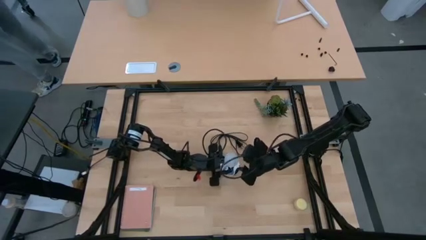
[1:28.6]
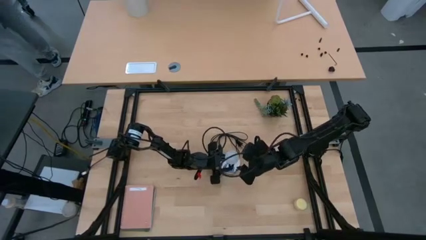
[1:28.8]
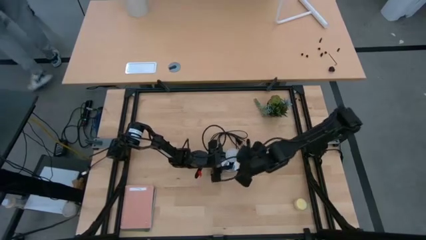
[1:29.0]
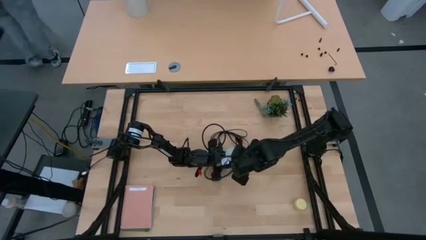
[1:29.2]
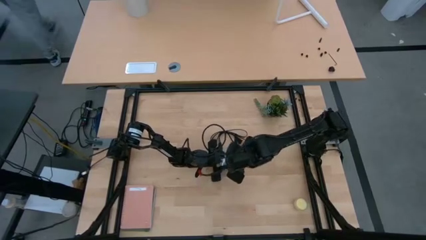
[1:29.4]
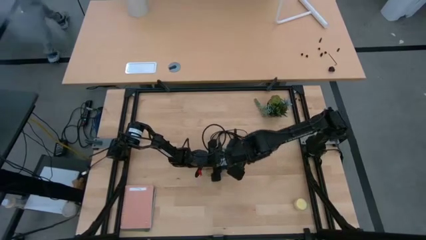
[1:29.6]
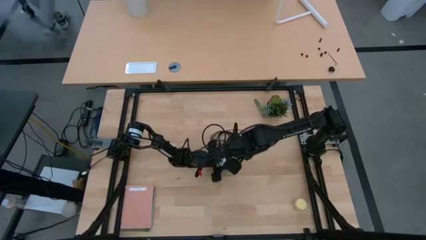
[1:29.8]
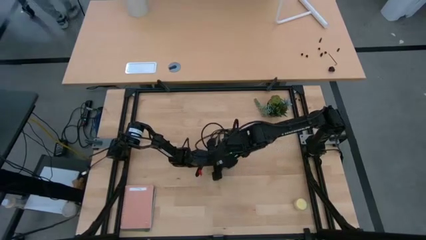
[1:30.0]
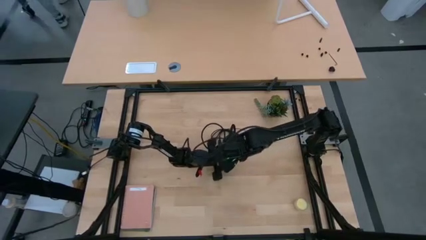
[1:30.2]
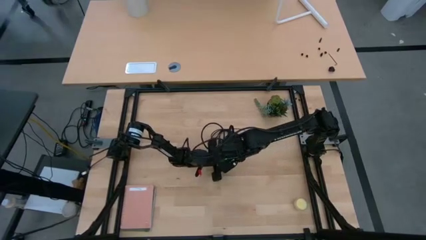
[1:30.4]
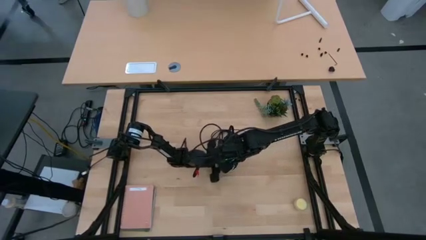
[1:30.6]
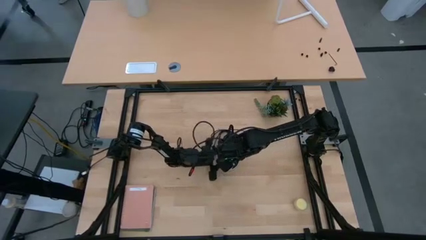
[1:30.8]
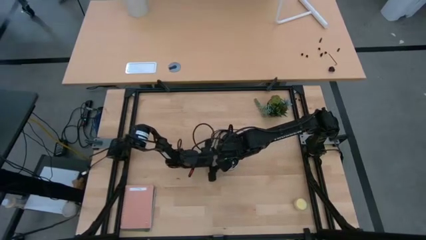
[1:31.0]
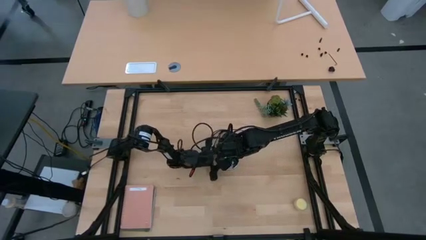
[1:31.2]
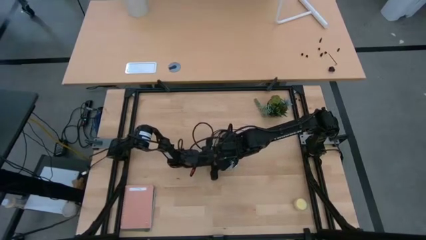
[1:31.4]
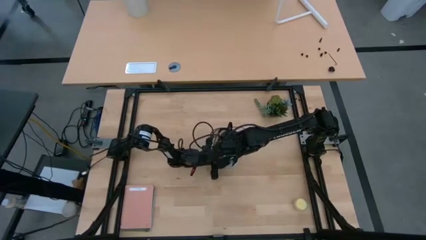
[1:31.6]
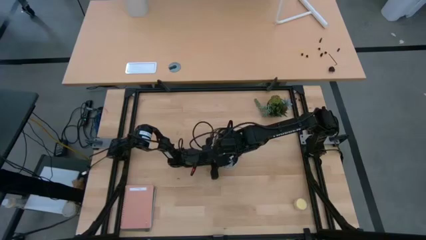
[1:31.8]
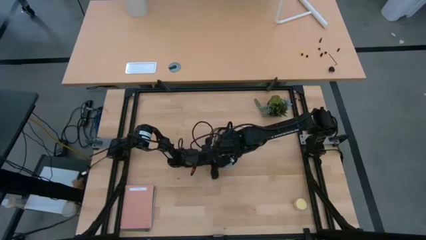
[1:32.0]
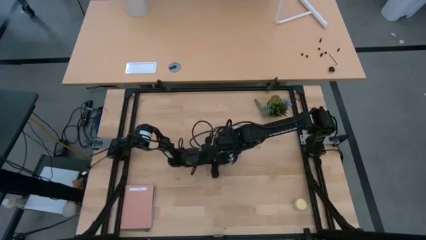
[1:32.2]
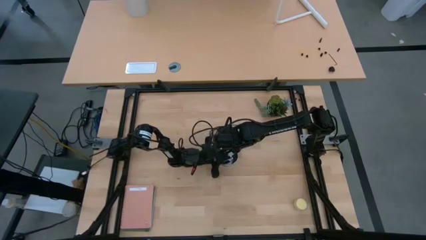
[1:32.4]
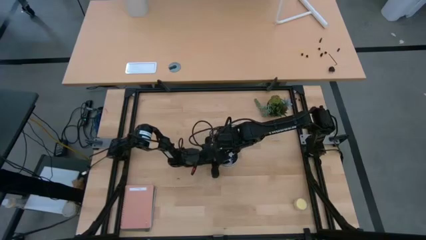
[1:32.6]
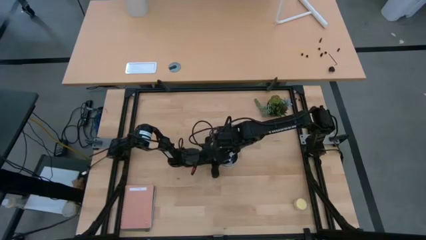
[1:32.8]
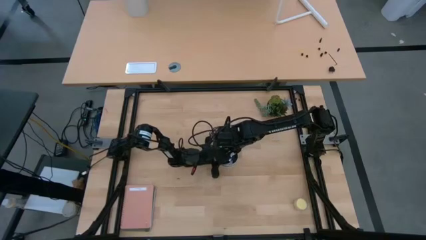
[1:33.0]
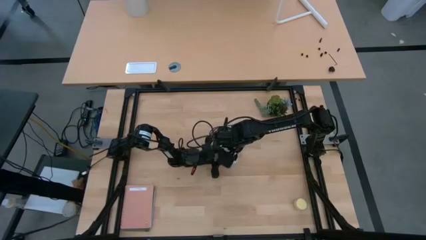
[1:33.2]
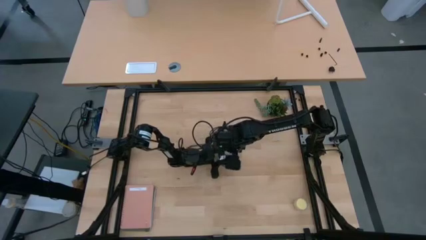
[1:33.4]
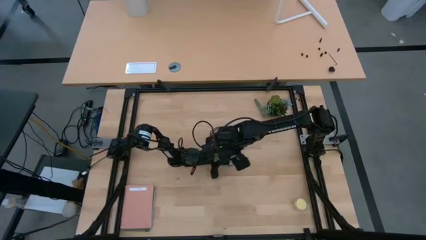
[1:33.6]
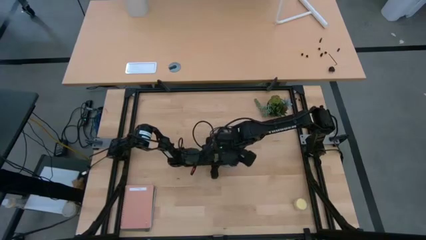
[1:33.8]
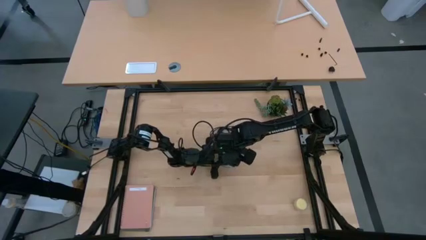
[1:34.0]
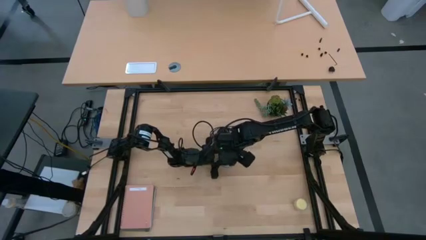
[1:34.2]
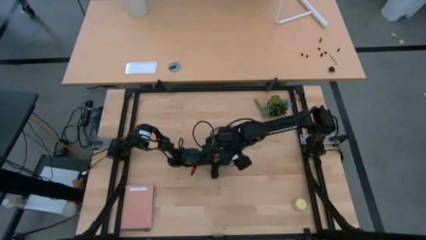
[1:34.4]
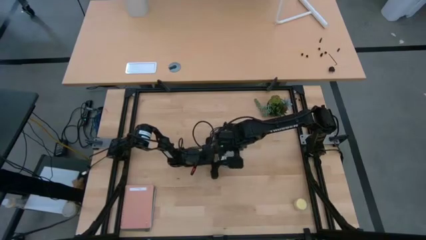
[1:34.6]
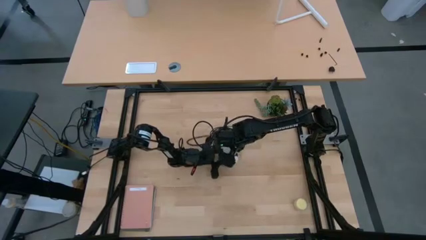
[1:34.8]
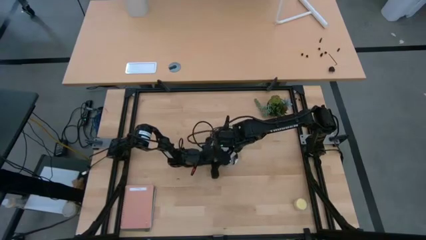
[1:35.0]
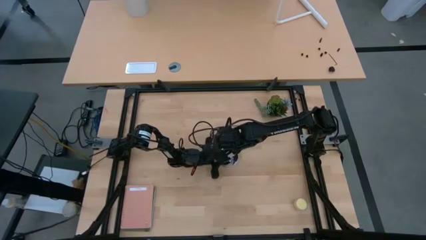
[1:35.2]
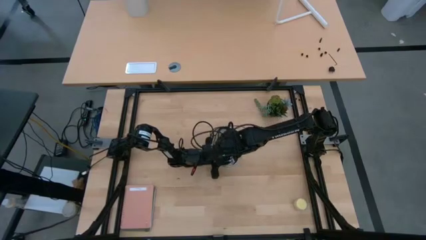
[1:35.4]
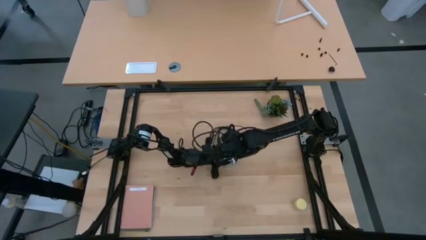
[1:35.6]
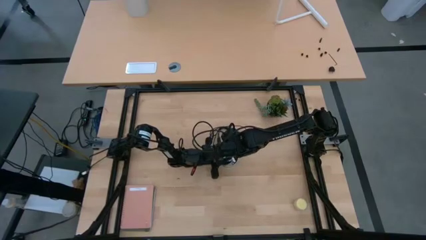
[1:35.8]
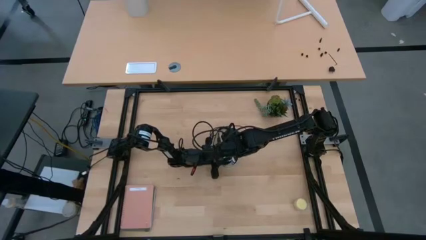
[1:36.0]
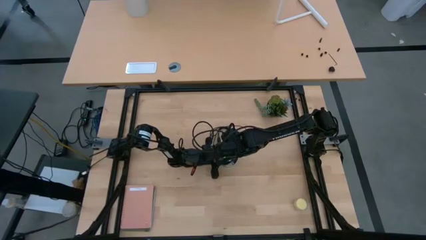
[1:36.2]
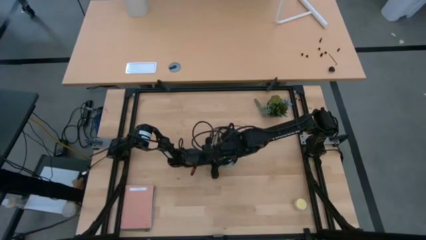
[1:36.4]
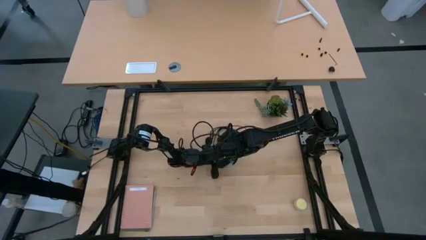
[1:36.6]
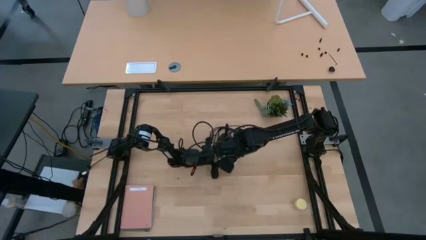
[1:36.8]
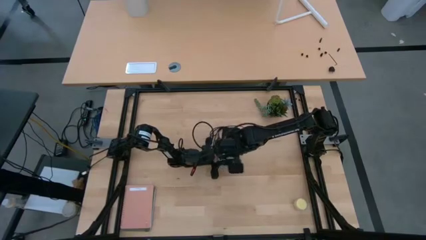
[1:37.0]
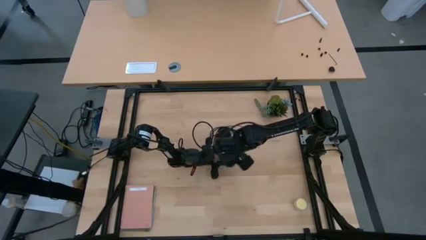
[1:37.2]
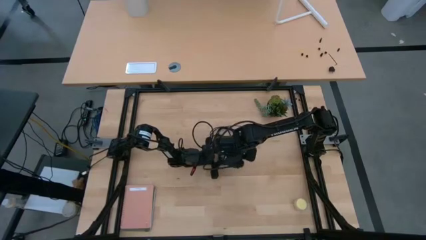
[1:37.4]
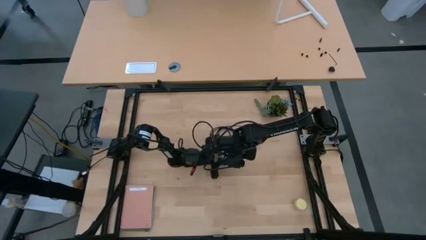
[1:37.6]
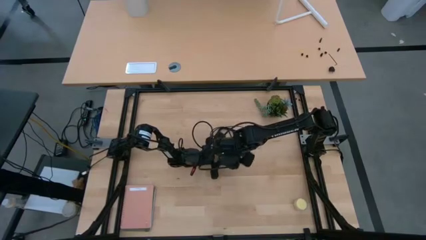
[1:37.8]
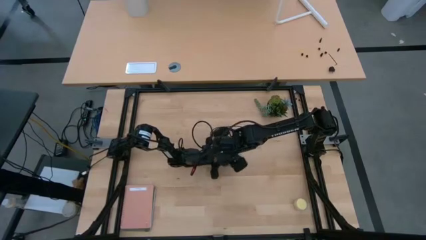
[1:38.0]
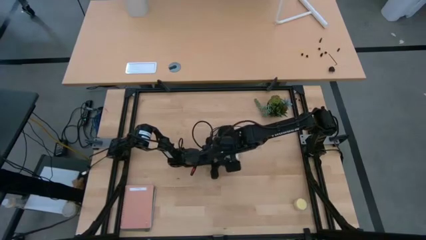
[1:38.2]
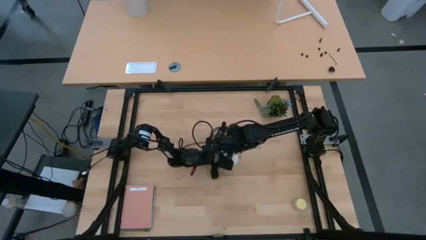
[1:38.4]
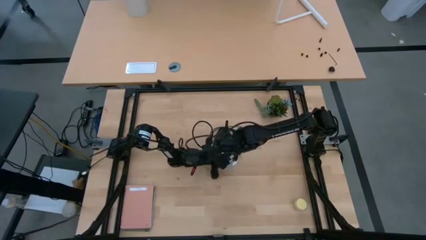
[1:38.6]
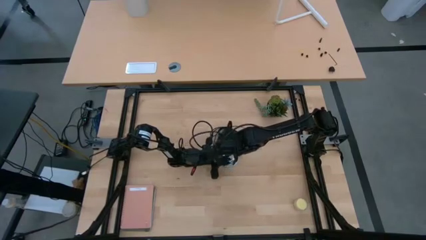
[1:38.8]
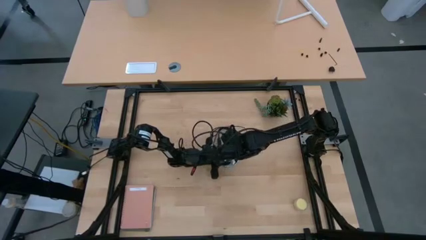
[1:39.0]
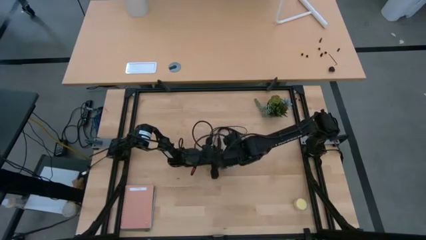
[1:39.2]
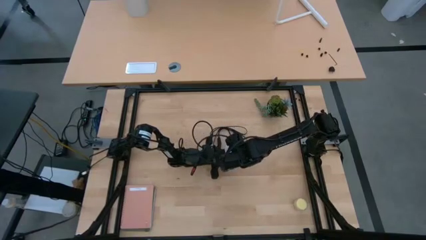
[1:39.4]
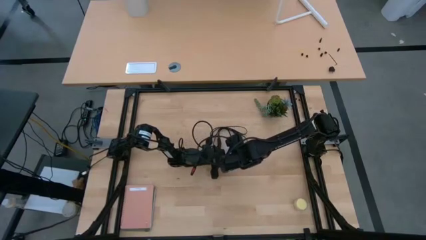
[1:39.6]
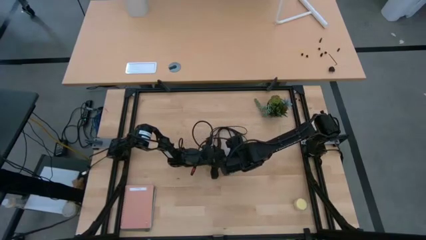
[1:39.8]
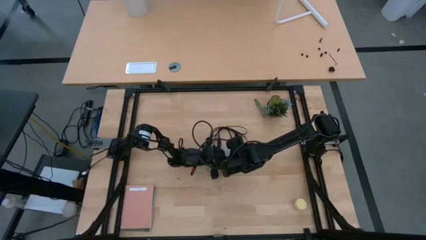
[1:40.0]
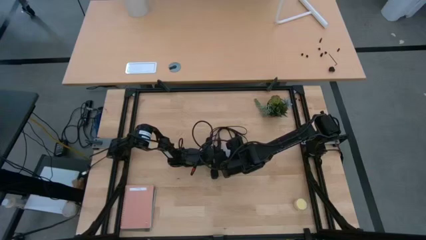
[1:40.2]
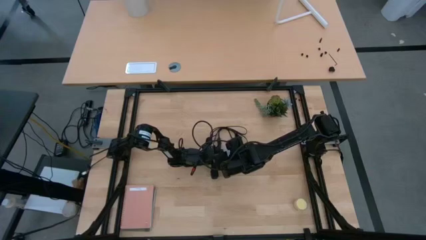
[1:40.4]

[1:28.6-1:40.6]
Task: Screw lightbulb
Remove the lightbulb from the lamp

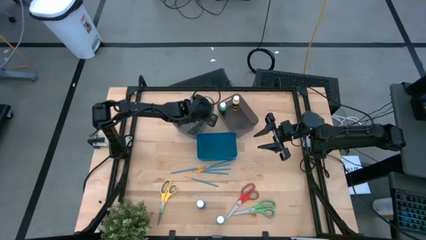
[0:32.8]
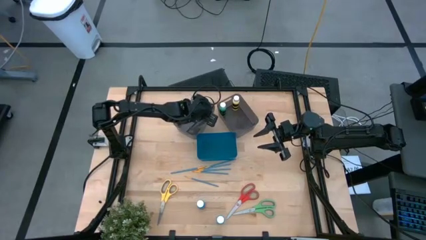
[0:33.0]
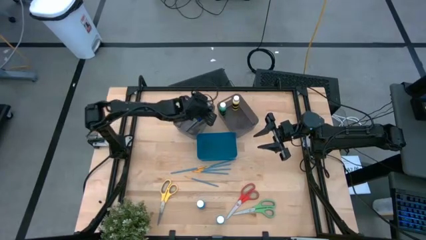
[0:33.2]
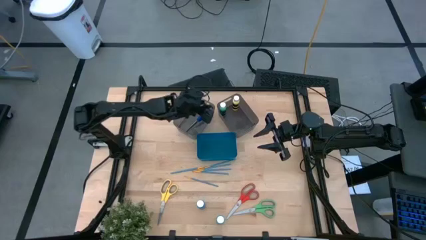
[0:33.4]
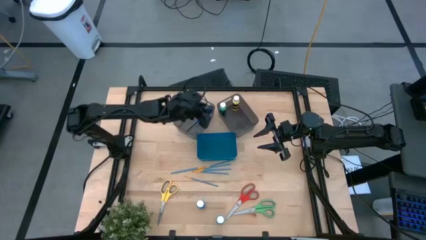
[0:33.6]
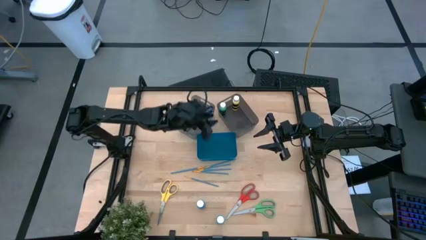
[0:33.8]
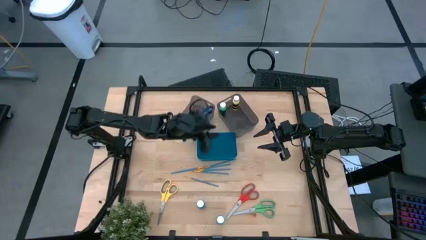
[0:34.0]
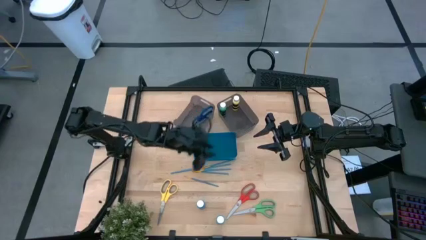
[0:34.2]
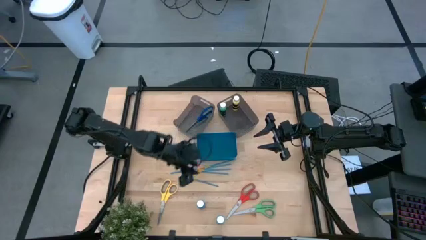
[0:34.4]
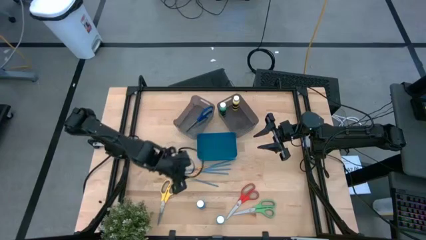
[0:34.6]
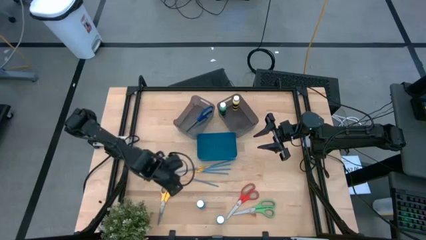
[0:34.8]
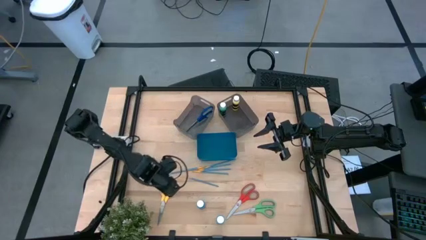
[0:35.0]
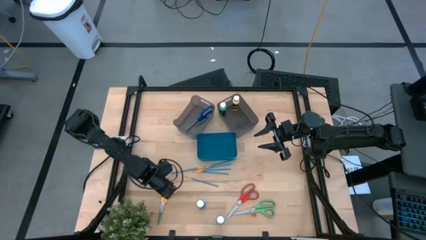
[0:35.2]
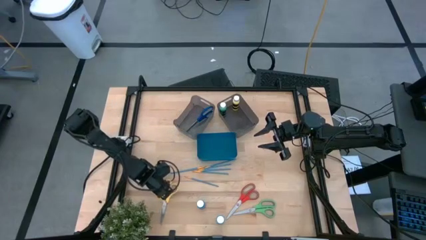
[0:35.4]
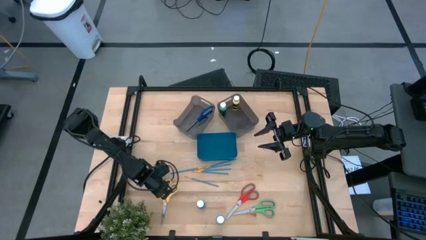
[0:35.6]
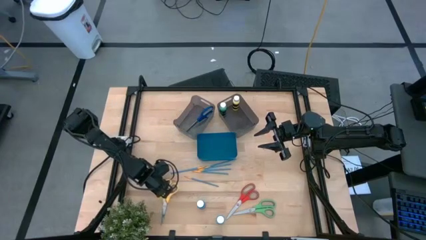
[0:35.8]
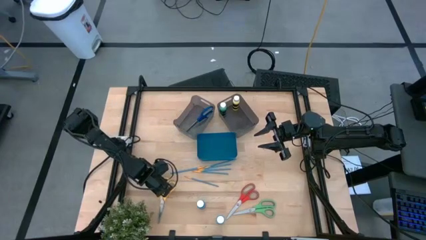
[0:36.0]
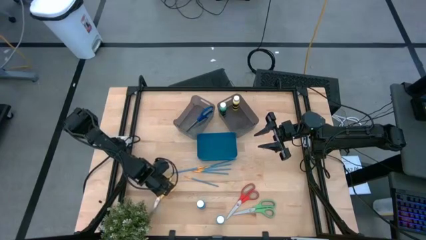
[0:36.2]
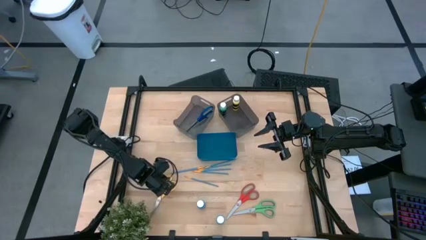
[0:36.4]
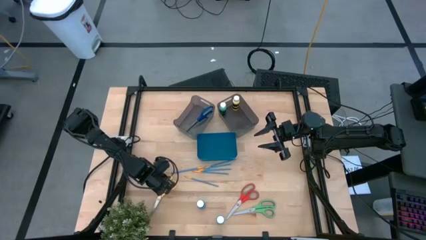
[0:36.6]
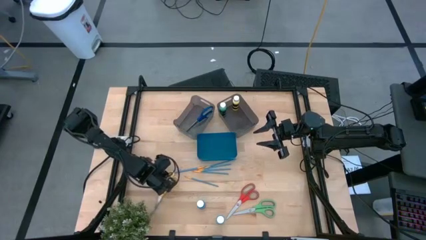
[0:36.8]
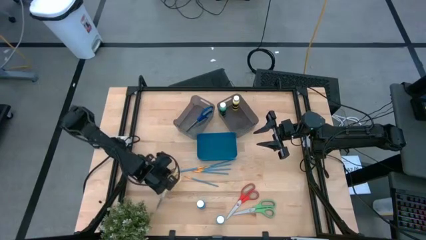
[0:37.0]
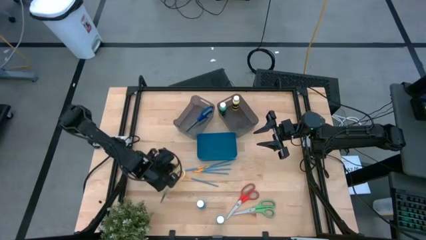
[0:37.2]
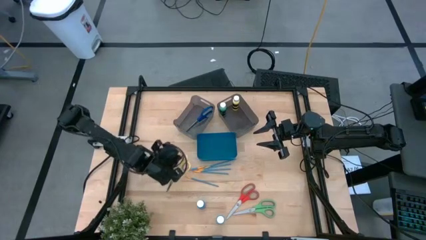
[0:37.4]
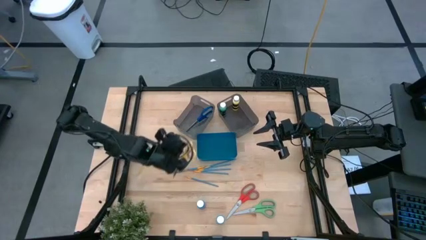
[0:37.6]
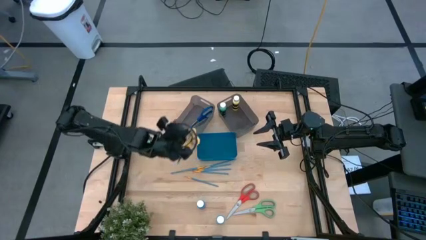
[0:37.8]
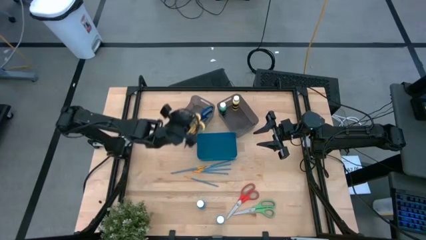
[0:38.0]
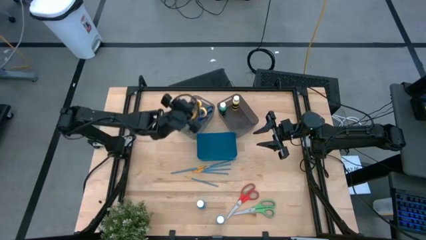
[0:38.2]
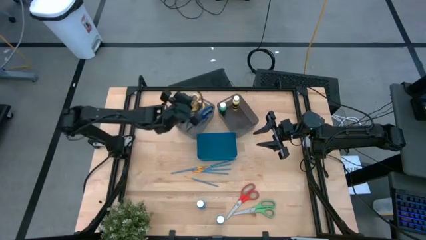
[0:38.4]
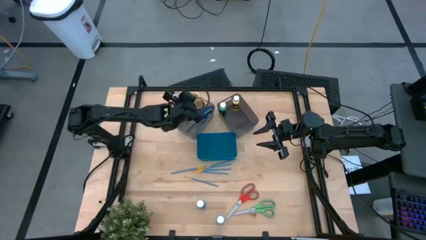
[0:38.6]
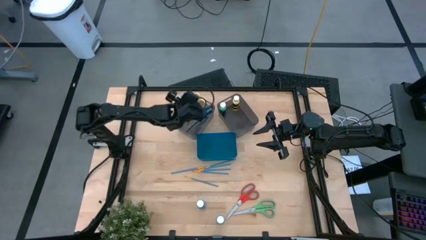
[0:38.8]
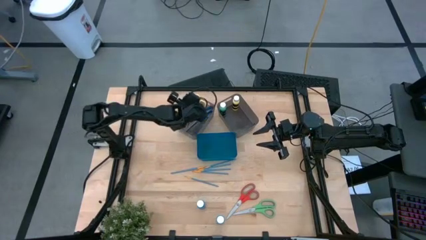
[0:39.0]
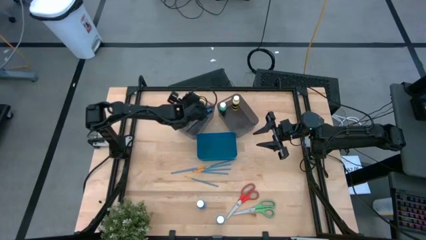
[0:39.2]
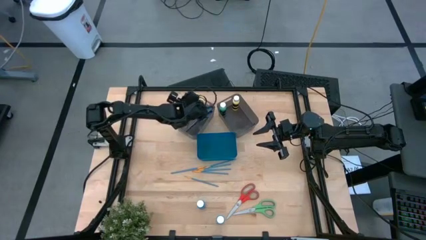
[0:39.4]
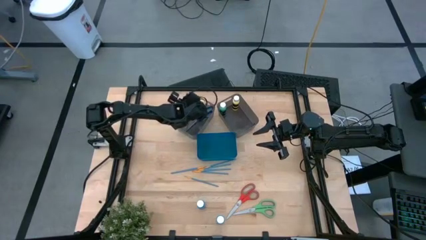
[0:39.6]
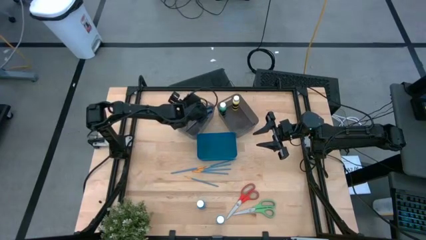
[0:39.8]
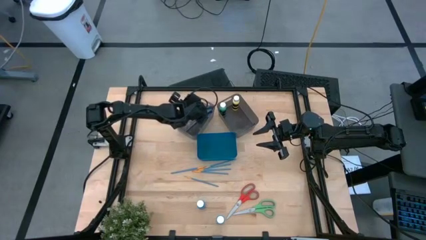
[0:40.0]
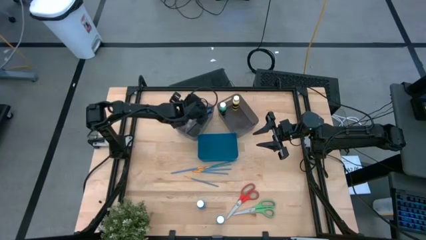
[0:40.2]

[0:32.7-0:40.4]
Task: Pick & Place Paint Supplies
Put the yellow scissors into the left black bin
